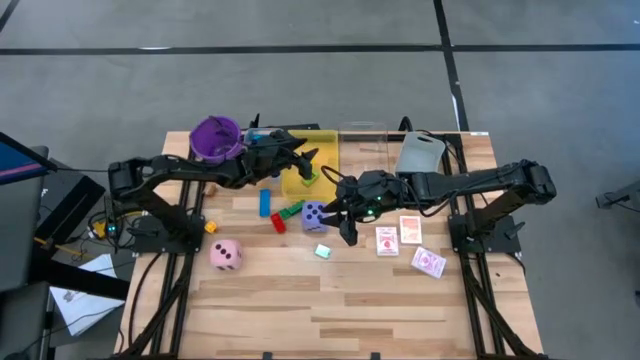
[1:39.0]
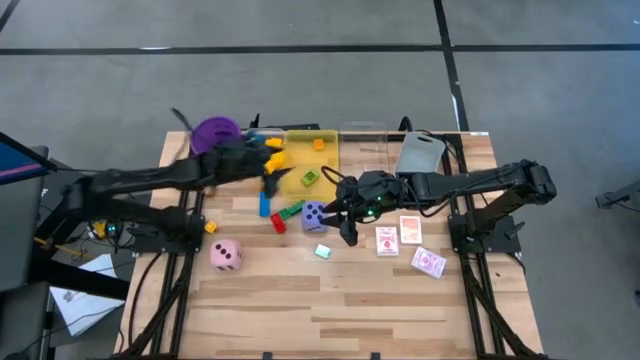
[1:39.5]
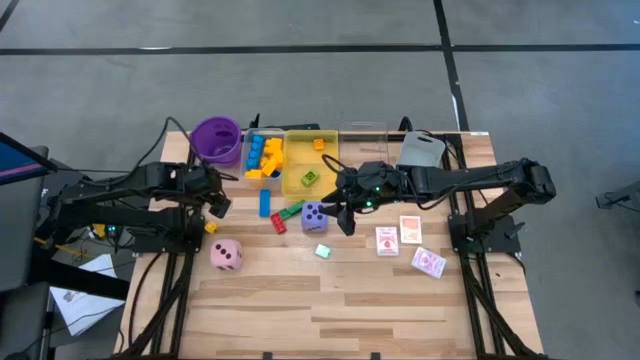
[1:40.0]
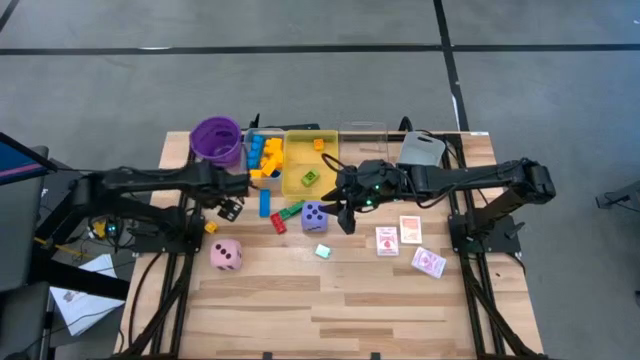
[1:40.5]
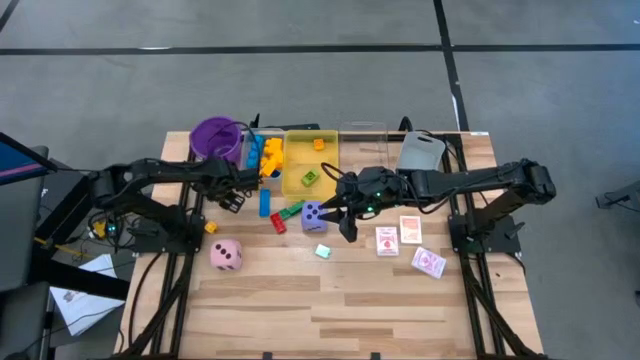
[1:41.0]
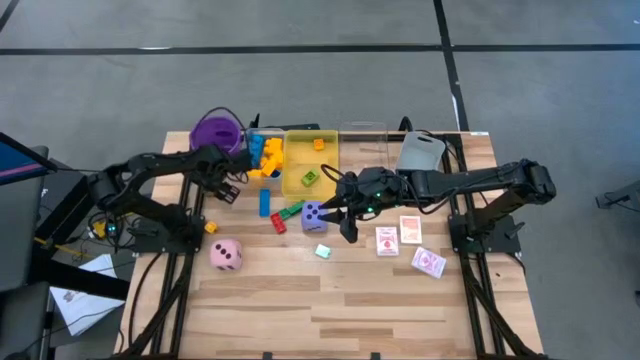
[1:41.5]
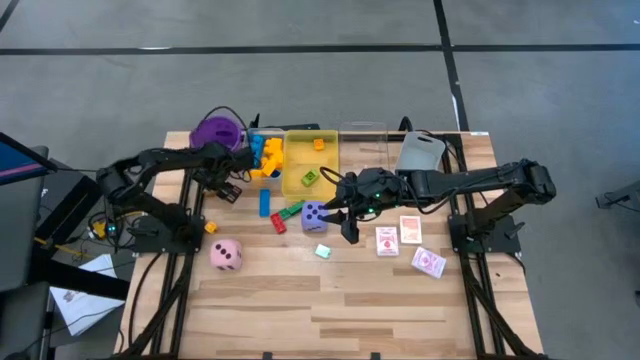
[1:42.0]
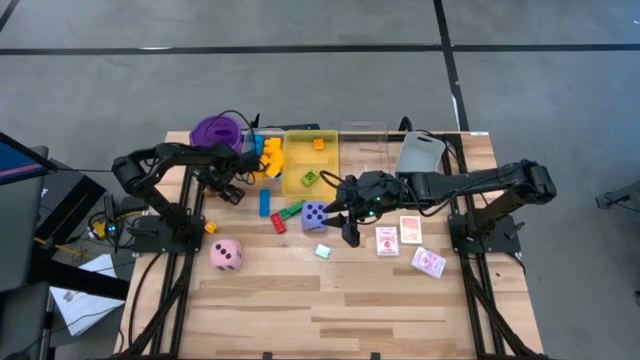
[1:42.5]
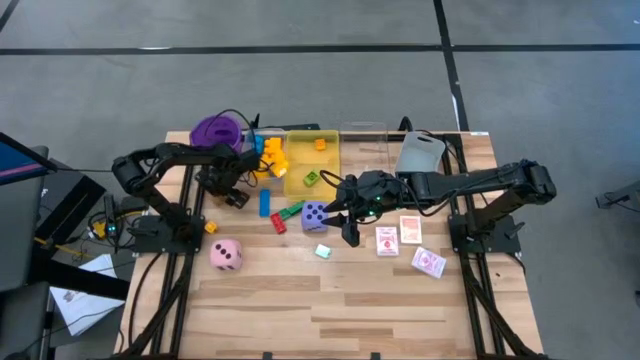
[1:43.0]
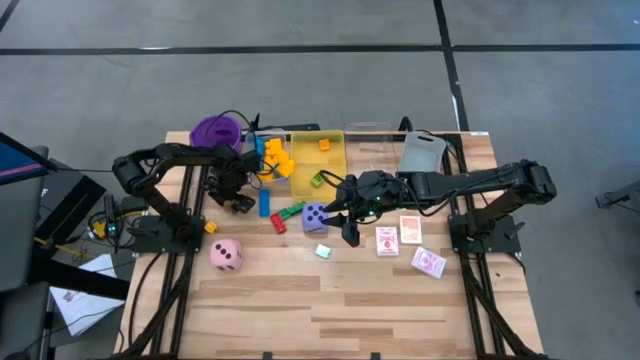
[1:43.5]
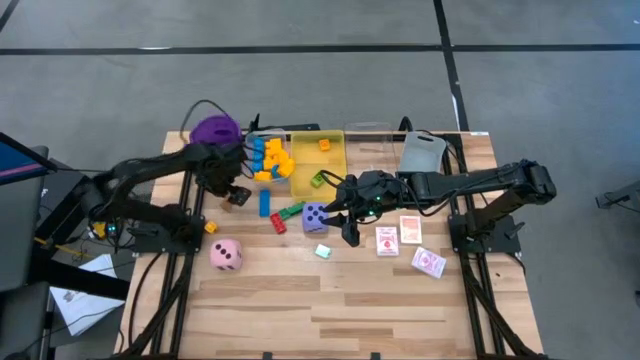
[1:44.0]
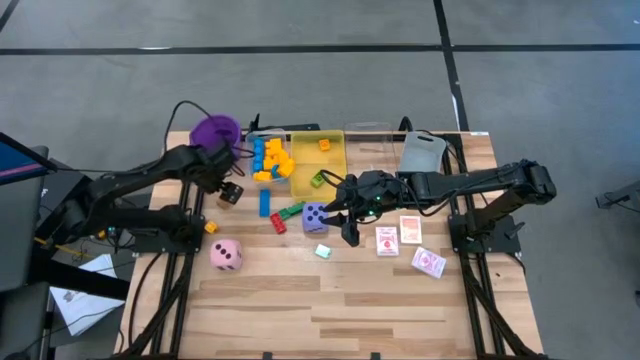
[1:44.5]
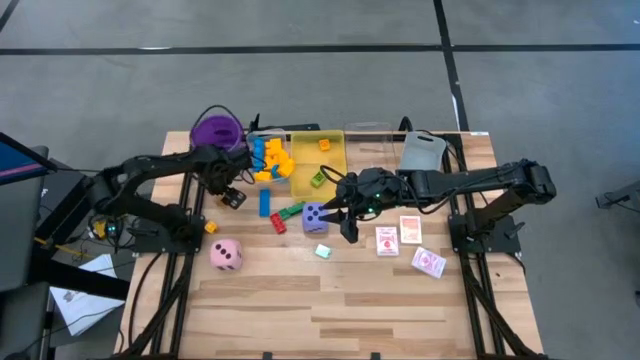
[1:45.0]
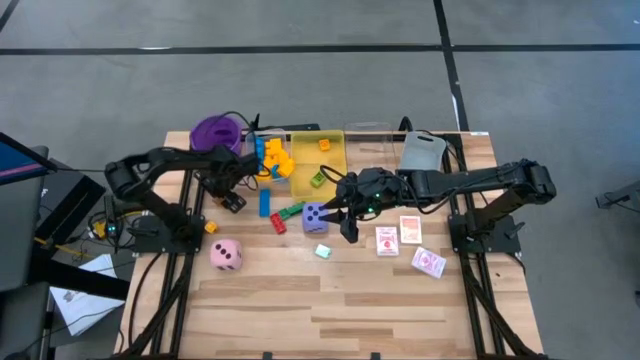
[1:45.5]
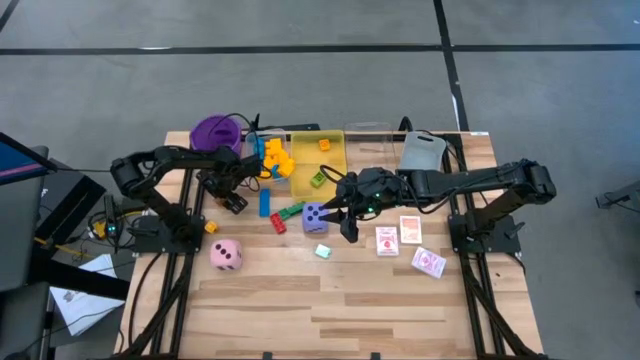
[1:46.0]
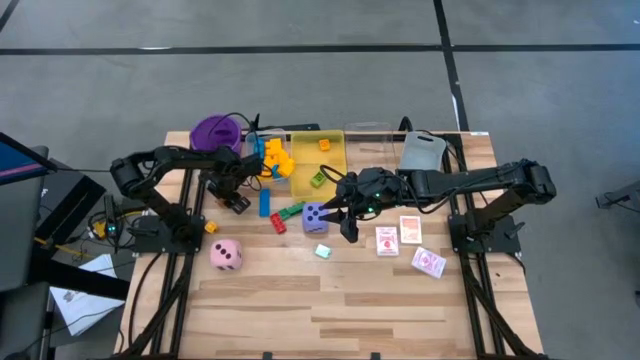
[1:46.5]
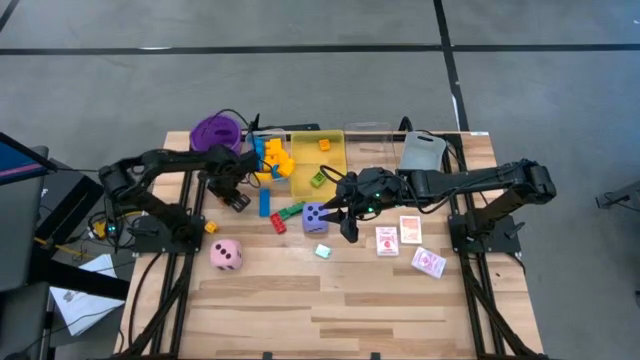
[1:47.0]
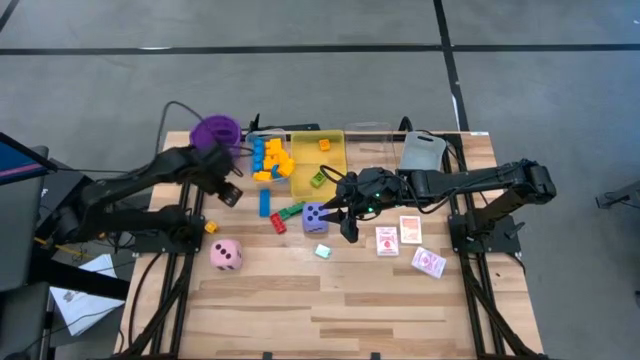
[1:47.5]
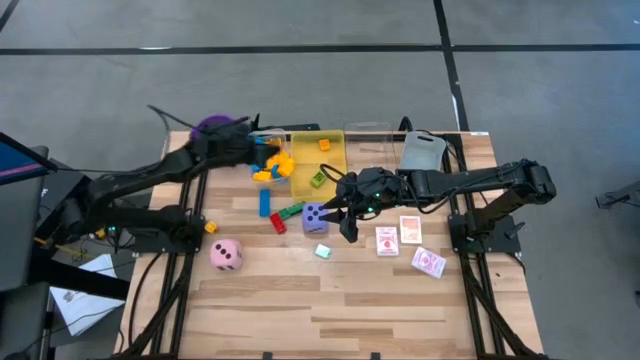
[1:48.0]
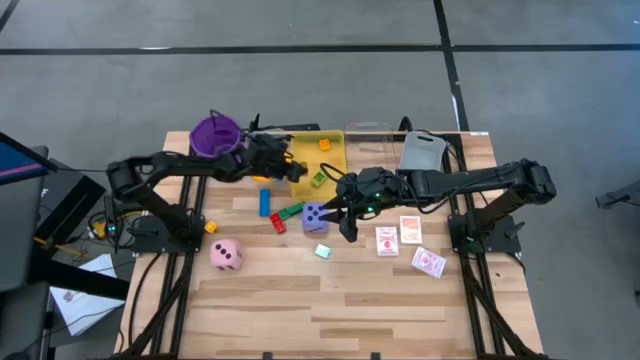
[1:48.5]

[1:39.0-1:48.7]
Task: Pick & Place Toys
Put the brown four stud game piece into the yellow bin

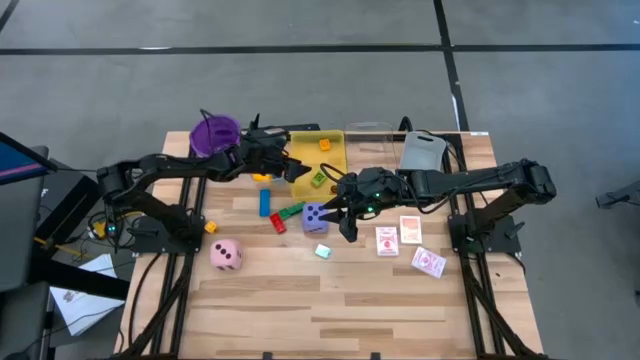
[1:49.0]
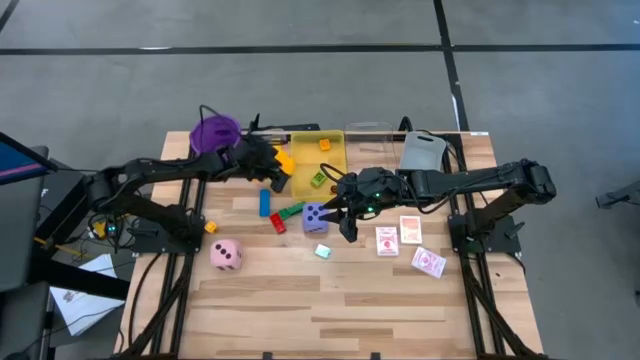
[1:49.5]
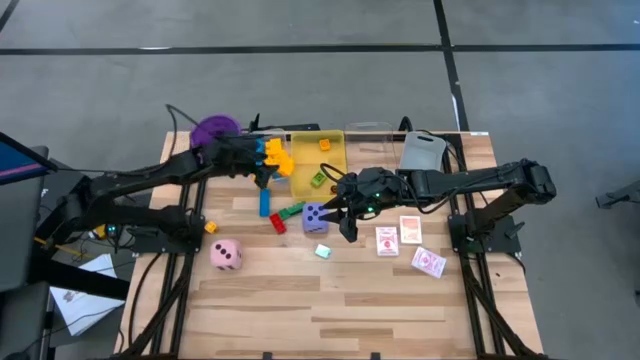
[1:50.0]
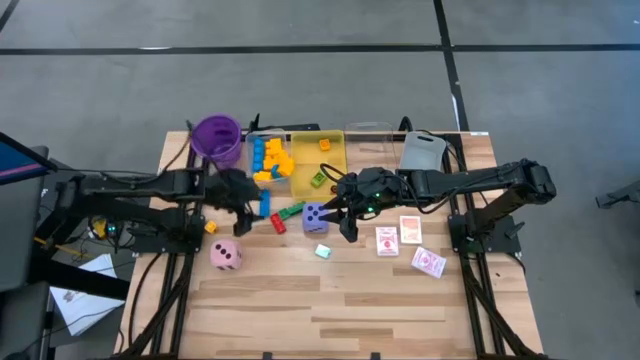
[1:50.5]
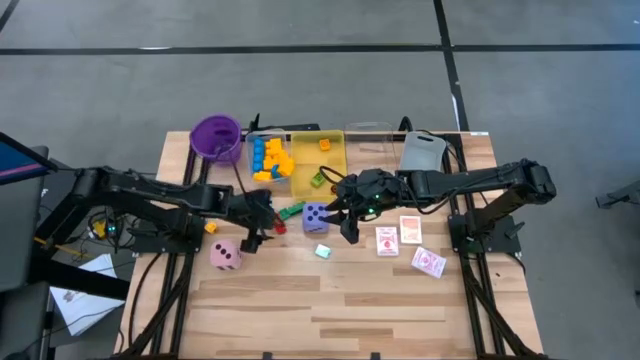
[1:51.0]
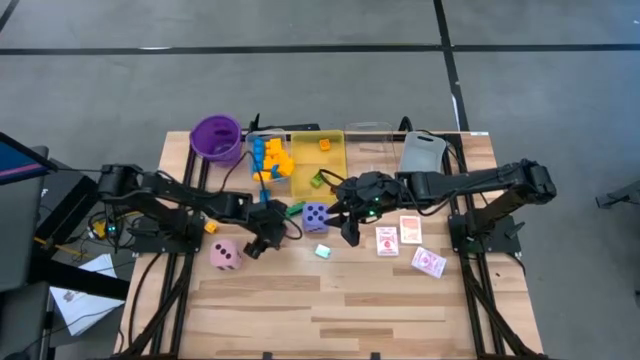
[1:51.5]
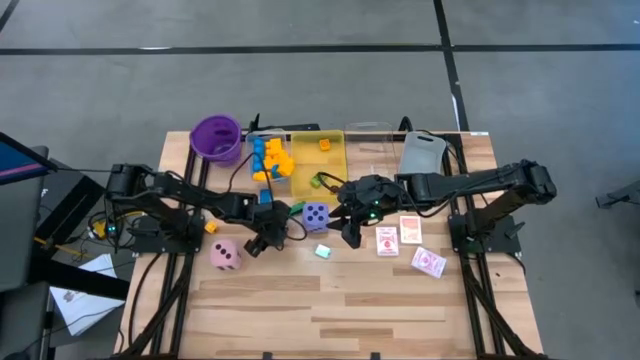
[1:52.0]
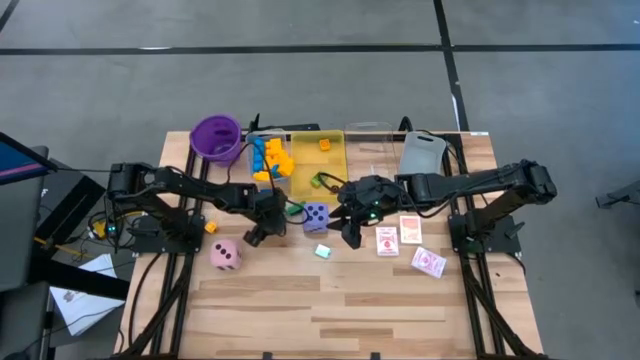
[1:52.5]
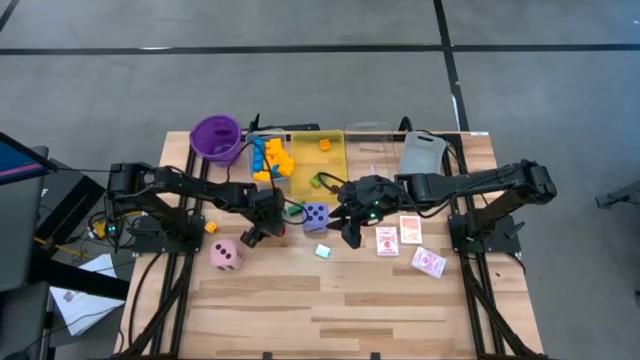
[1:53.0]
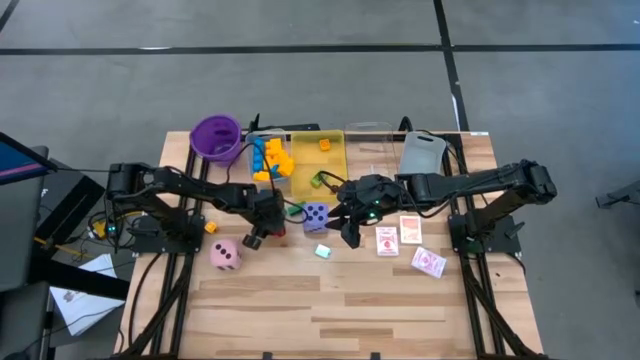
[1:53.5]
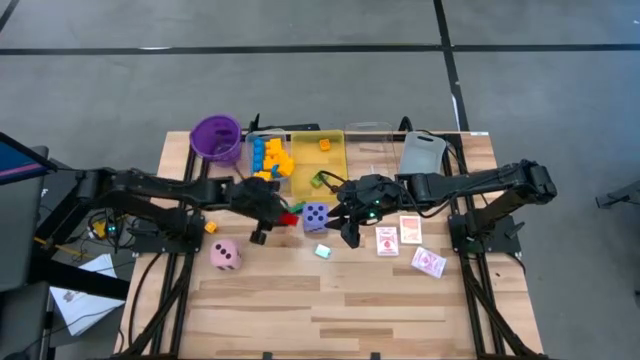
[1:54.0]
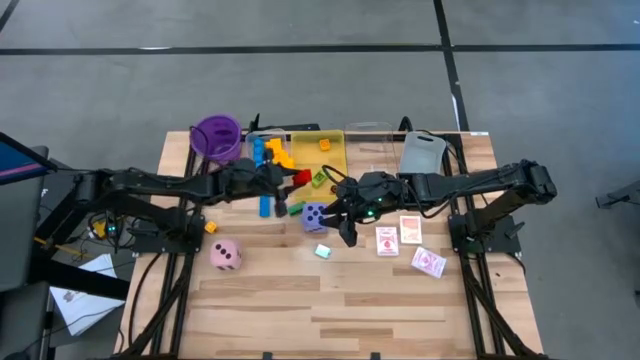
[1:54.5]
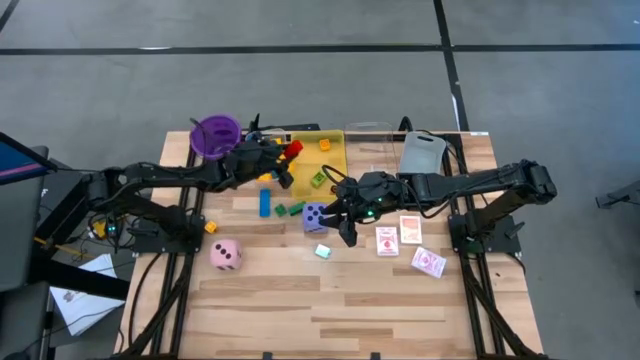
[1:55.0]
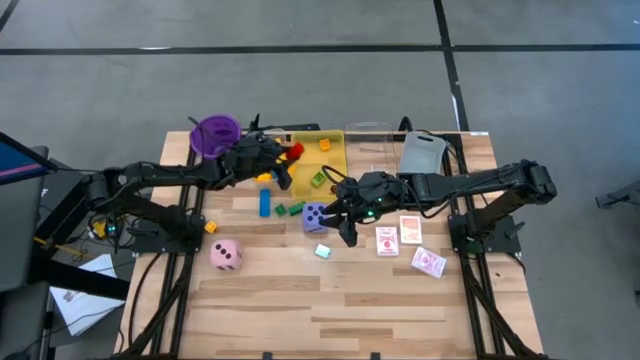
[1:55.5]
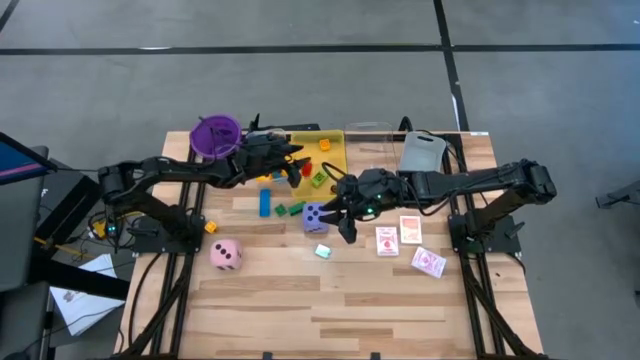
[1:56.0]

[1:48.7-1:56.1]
Put the red eight stud game piece into the yellow bin

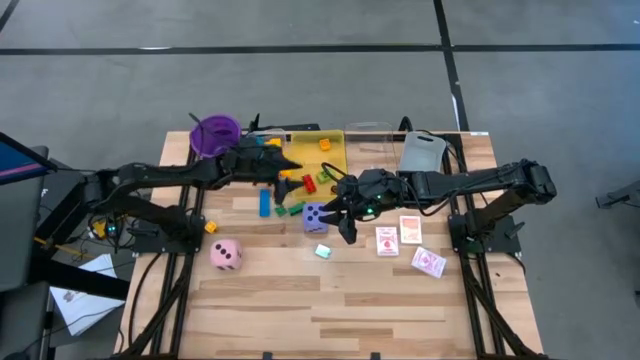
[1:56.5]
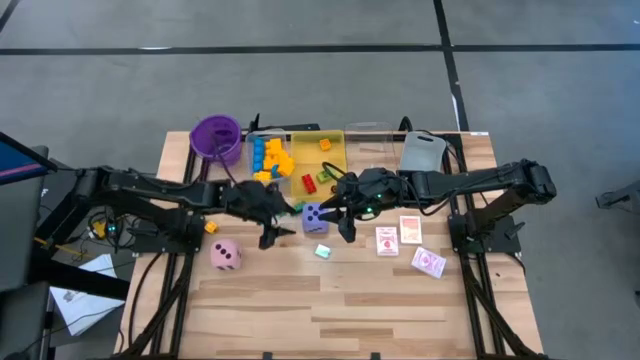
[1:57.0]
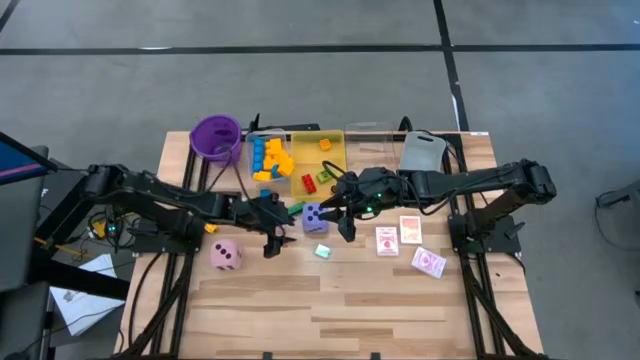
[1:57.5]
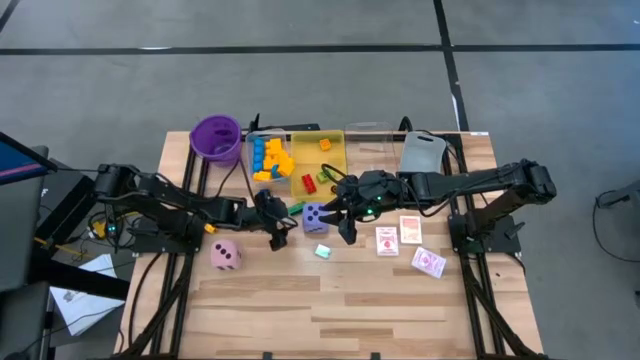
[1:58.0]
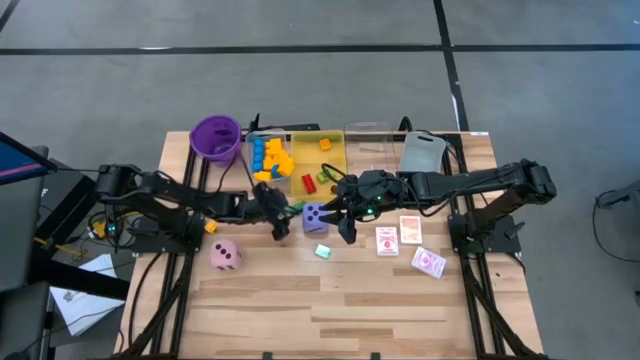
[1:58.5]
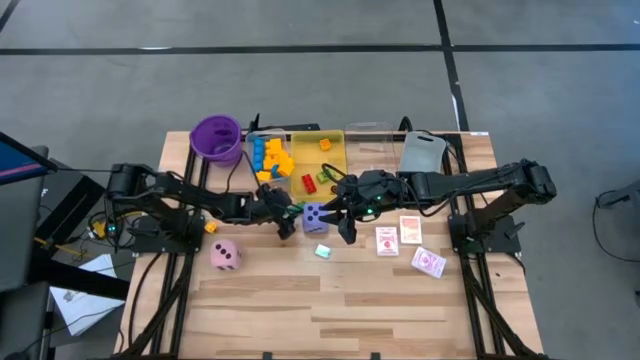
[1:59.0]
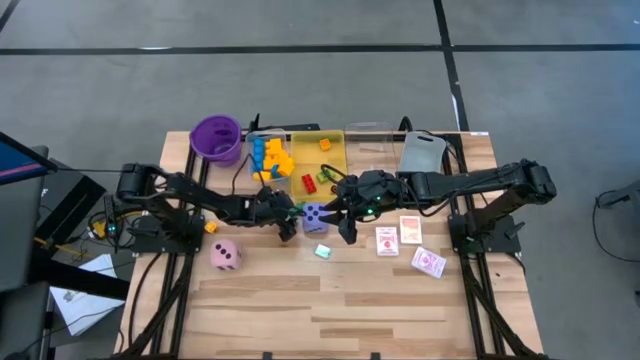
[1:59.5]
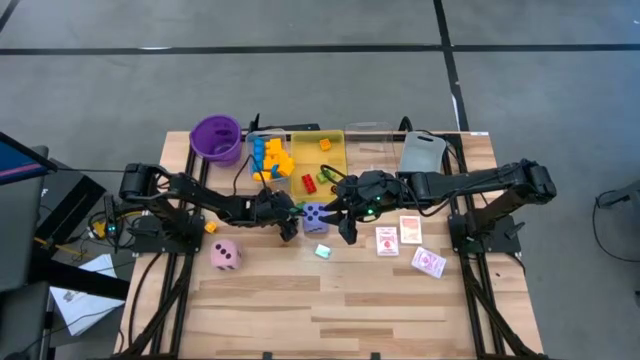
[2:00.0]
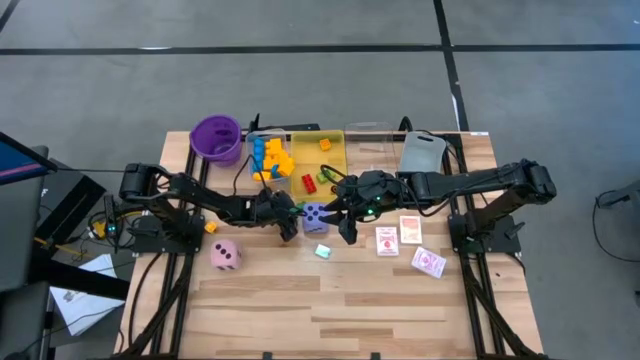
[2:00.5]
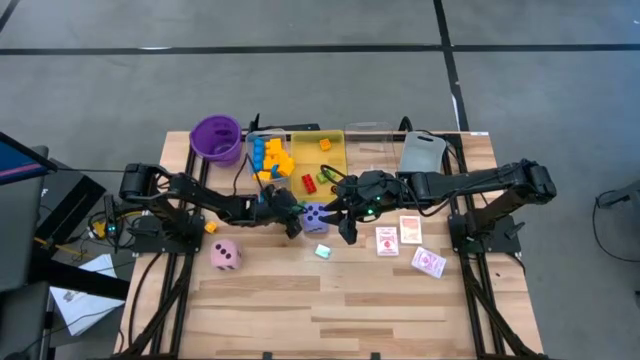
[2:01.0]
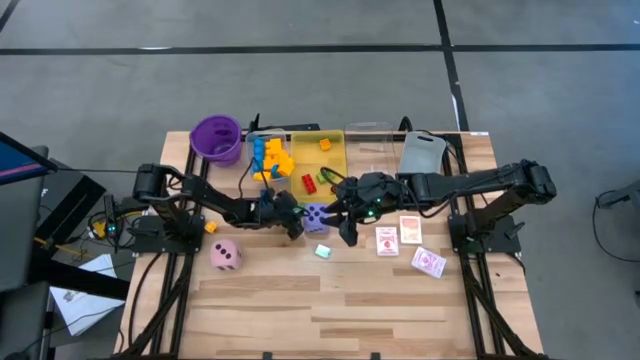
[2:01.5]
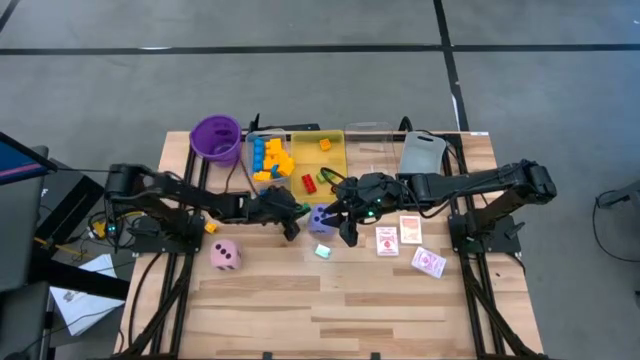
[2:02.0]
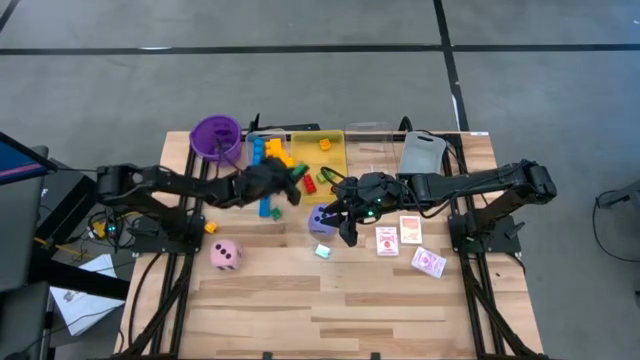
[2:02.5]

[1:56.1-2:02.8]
Put the green eight stud game piece into the yellow bin
